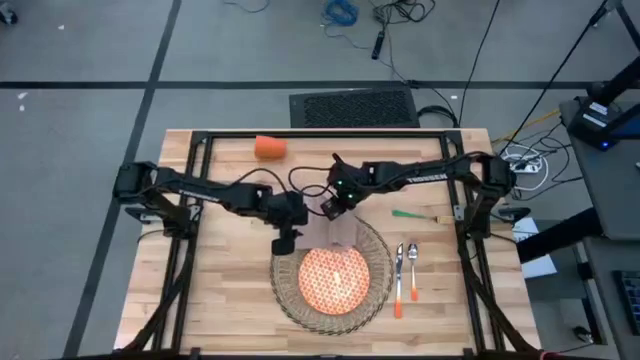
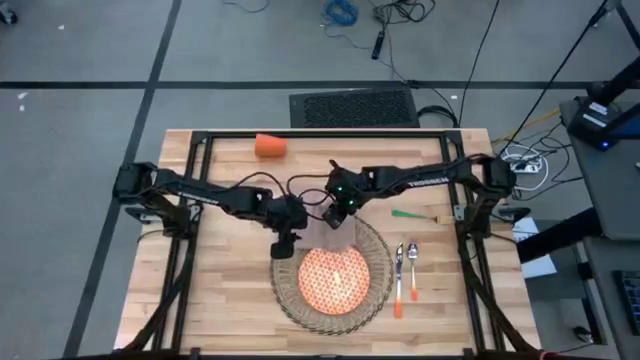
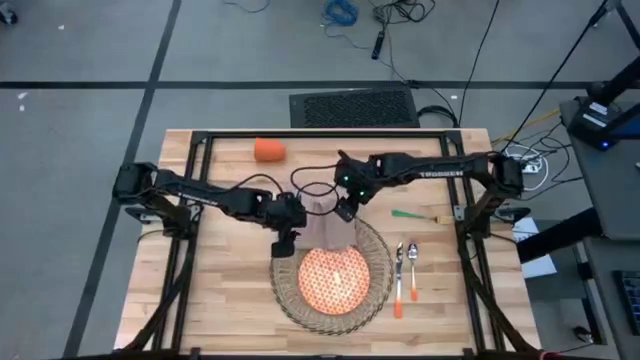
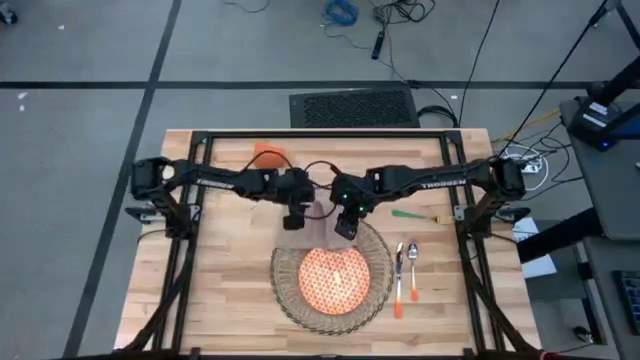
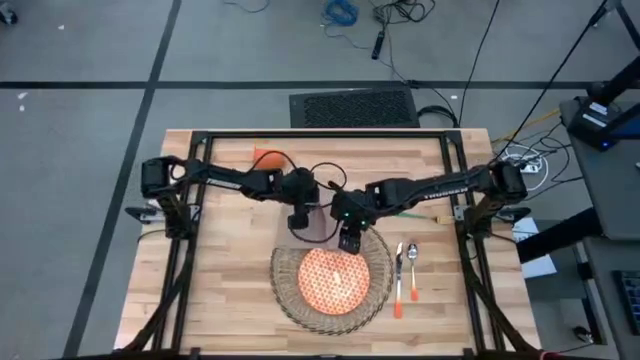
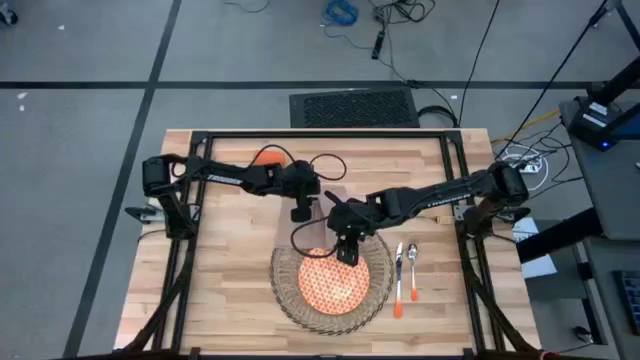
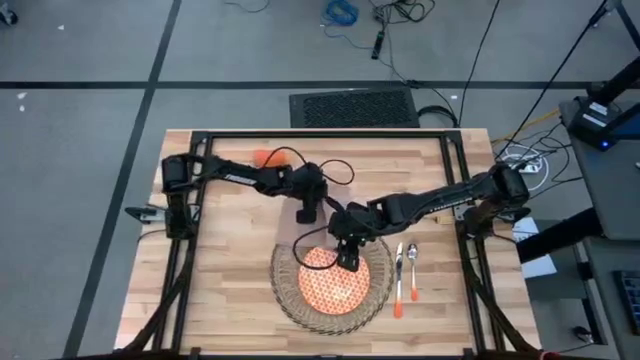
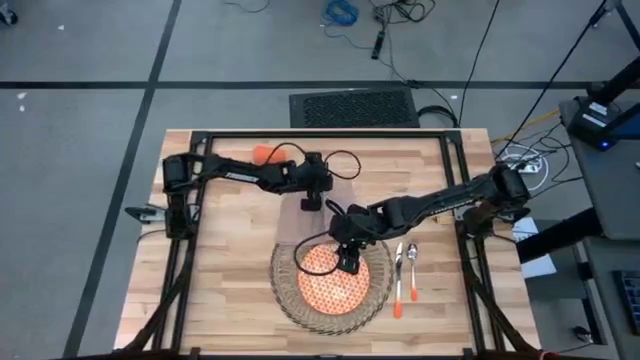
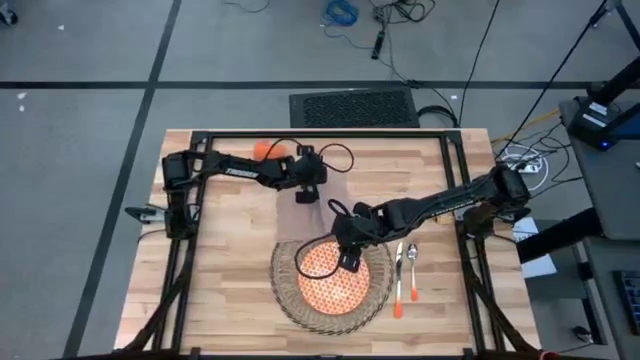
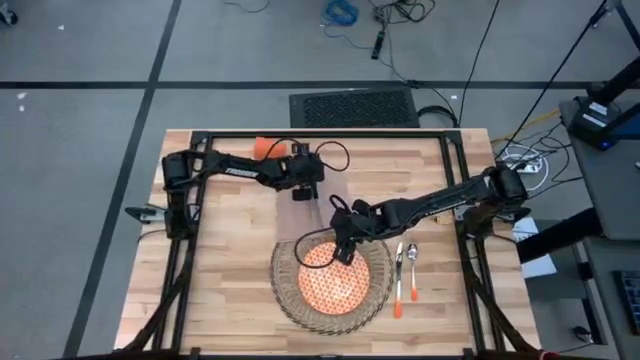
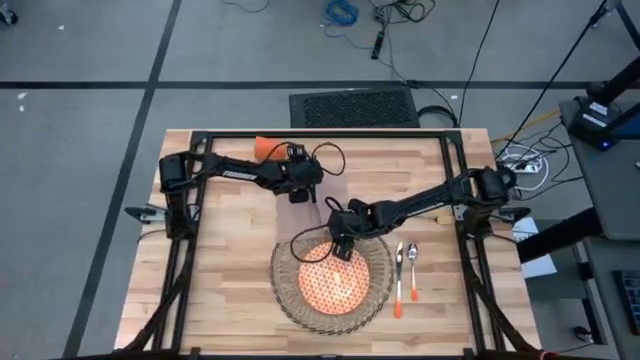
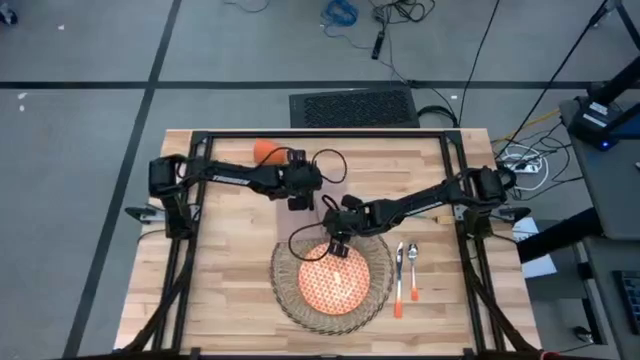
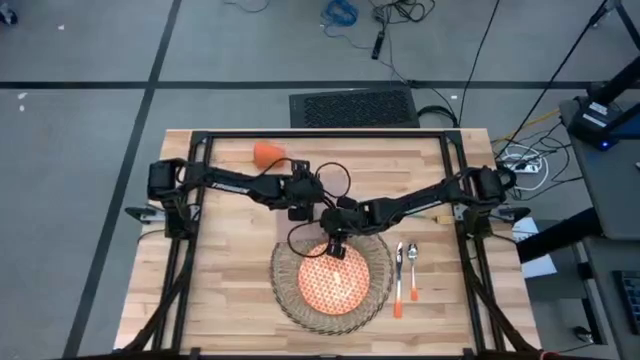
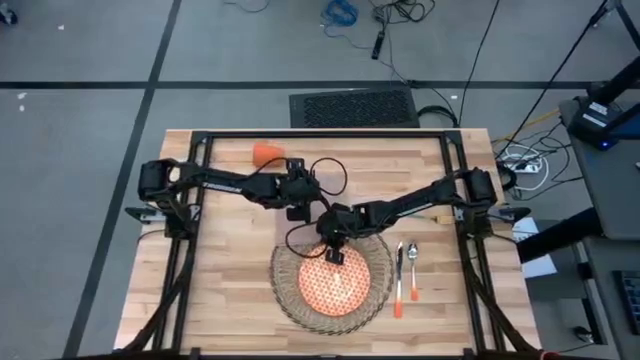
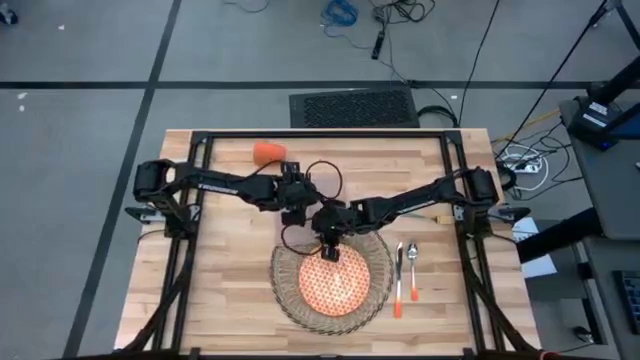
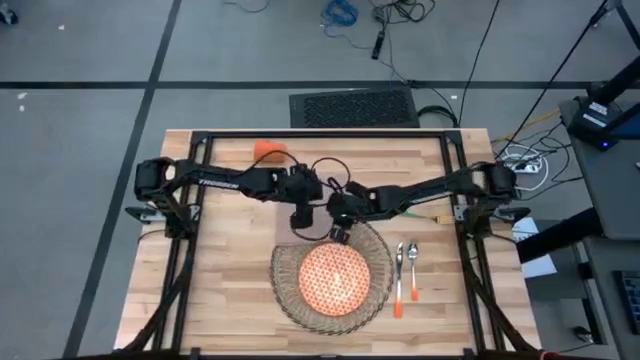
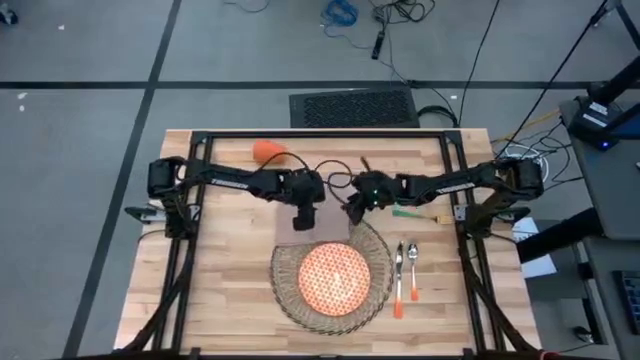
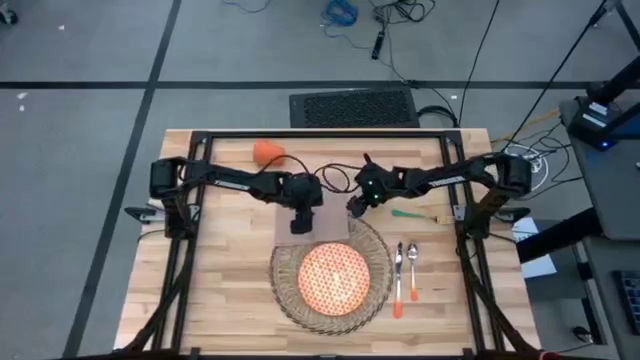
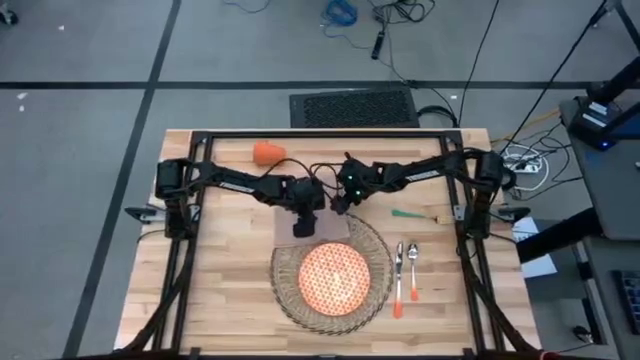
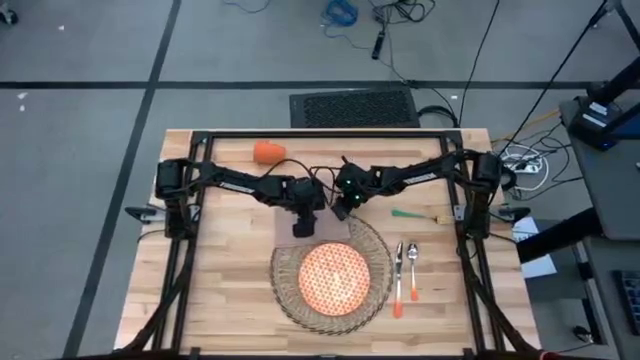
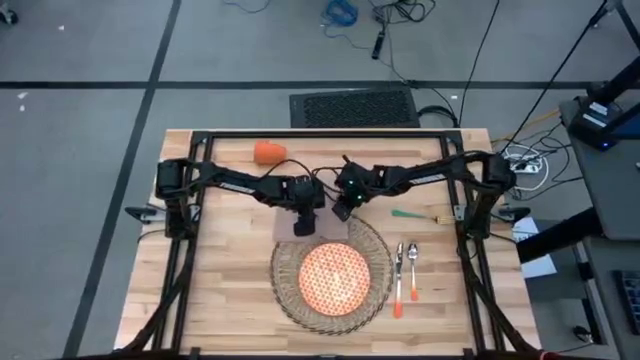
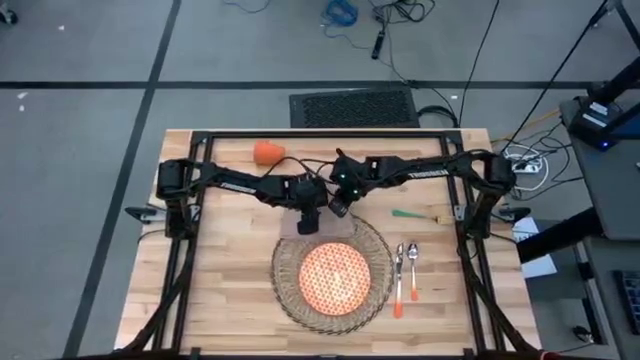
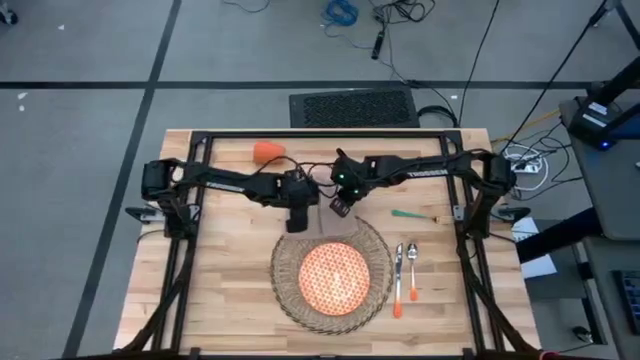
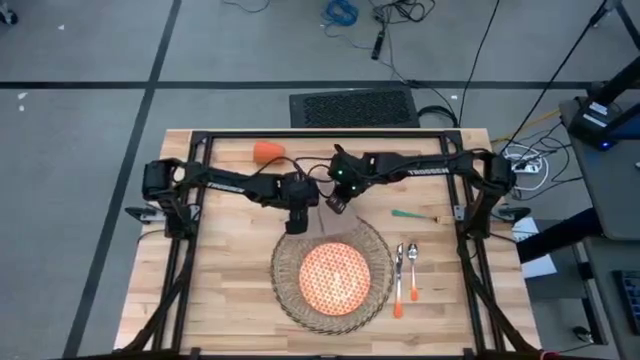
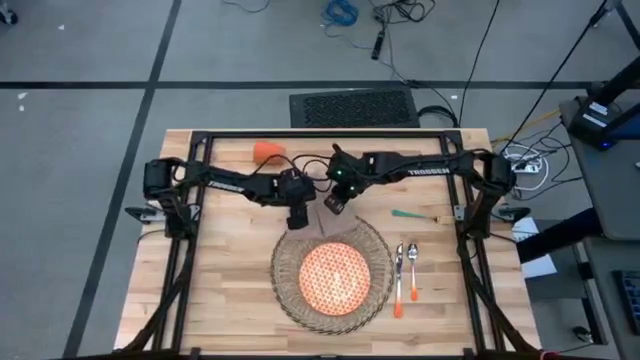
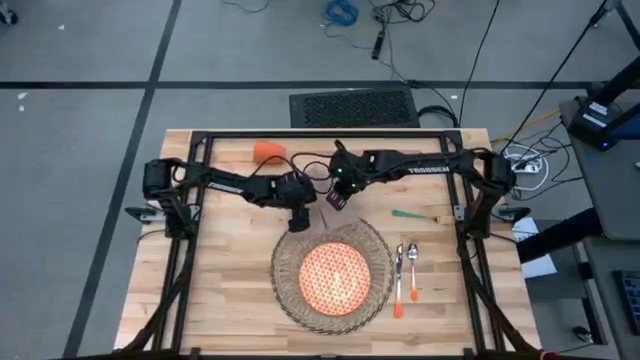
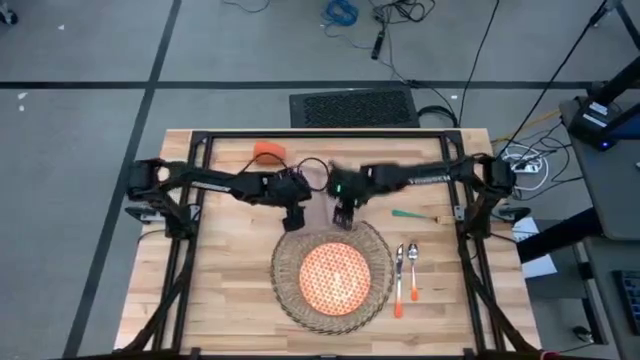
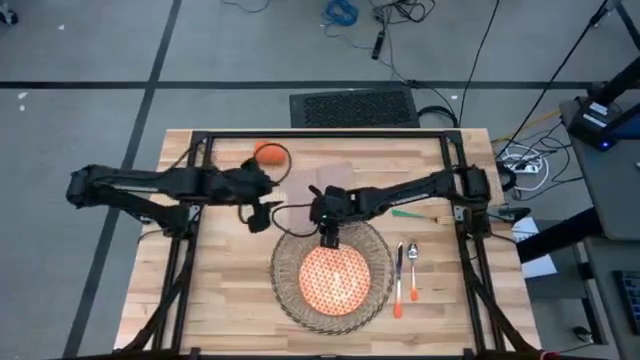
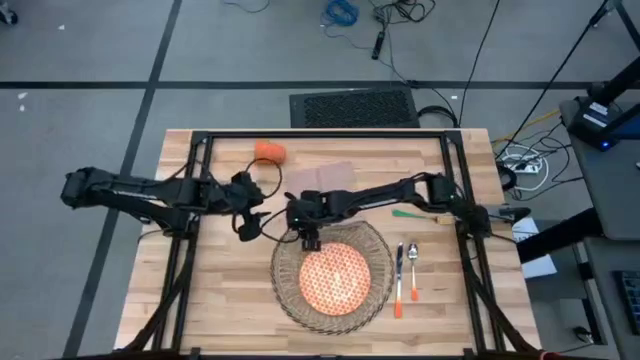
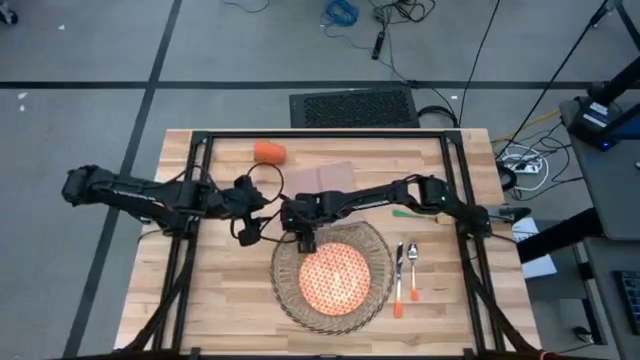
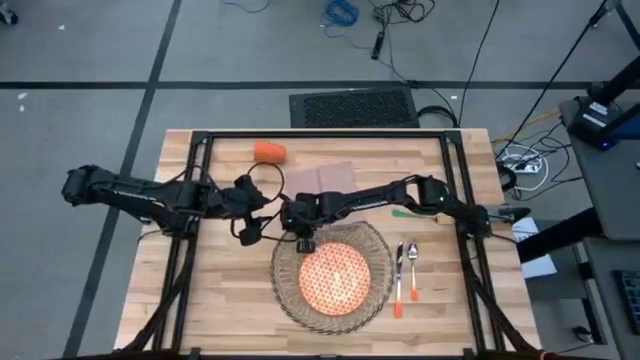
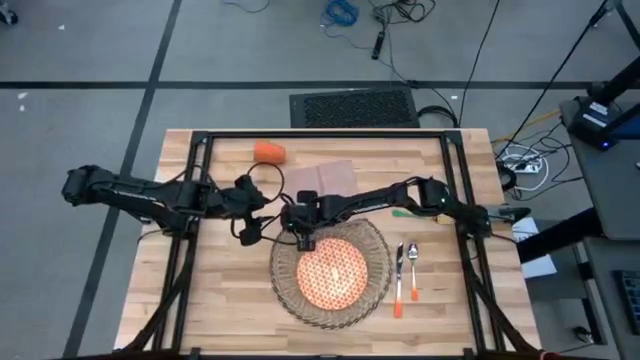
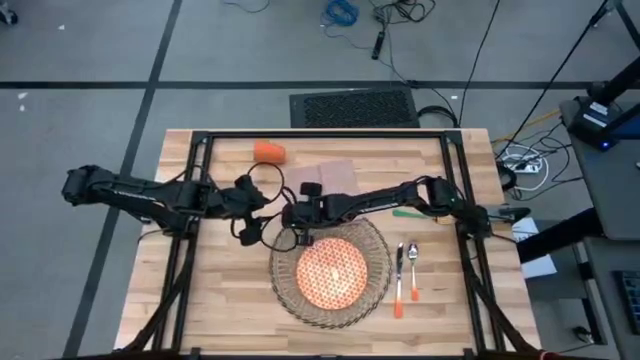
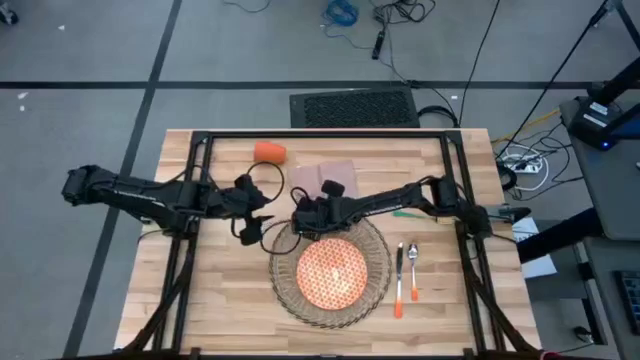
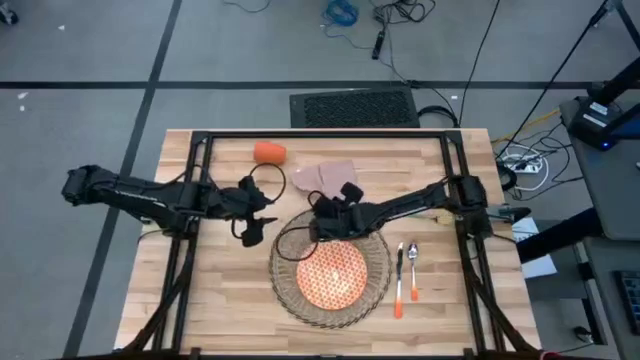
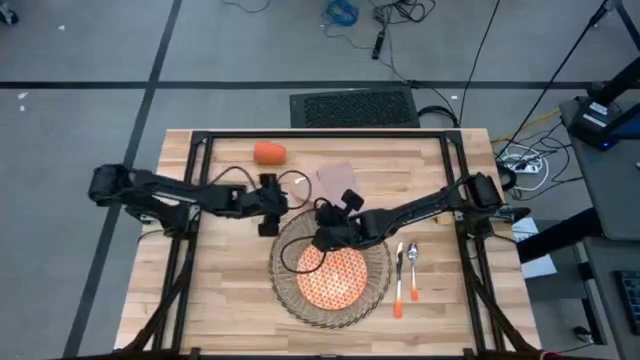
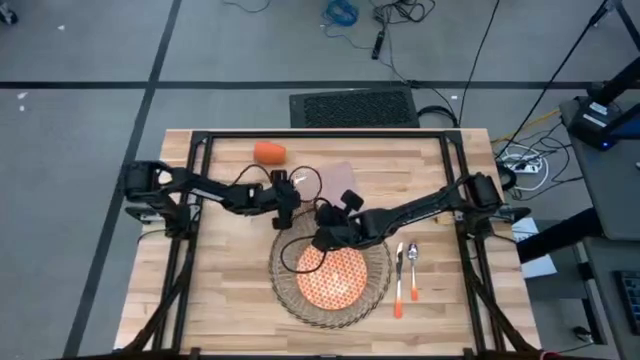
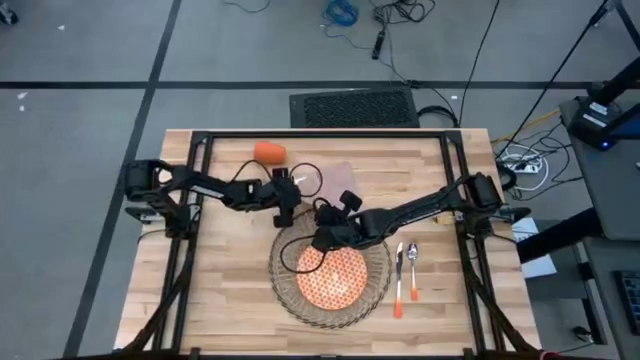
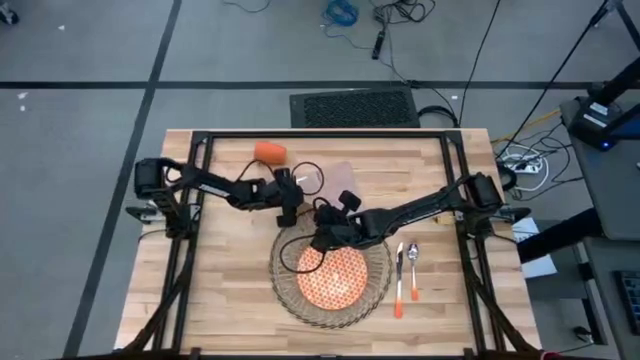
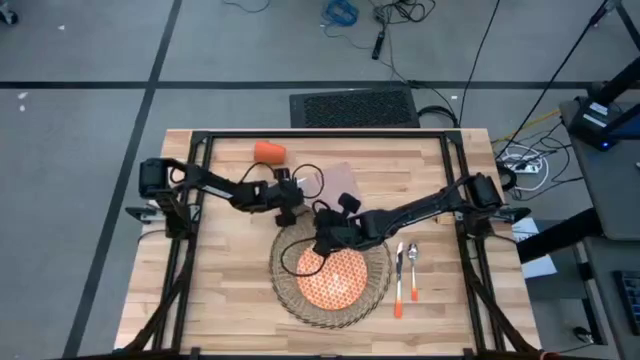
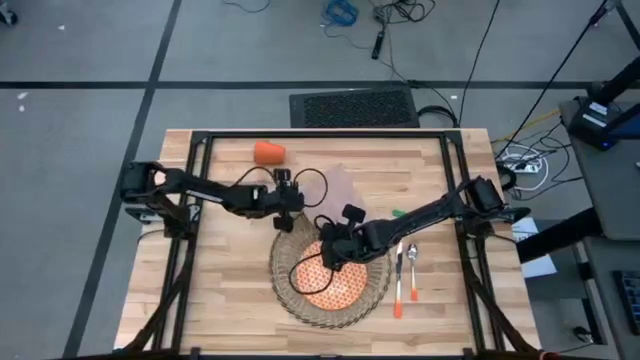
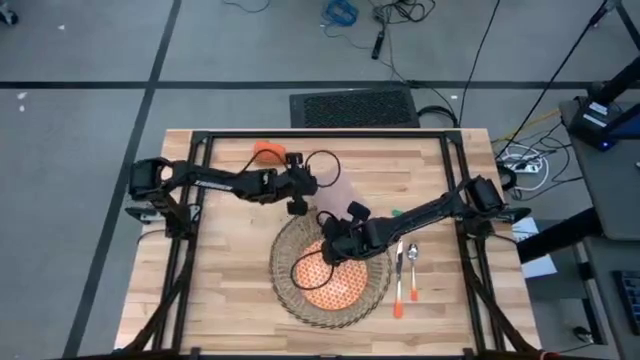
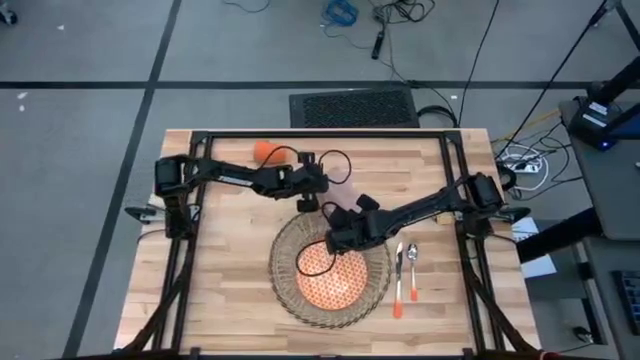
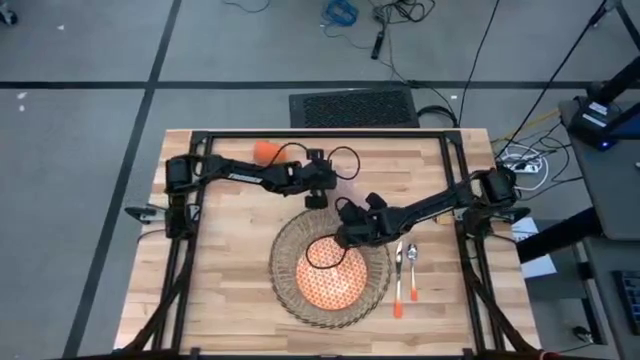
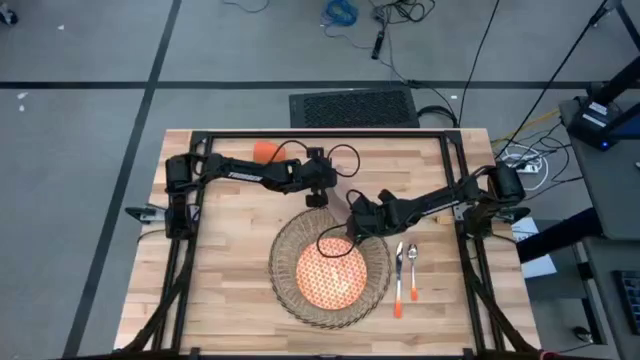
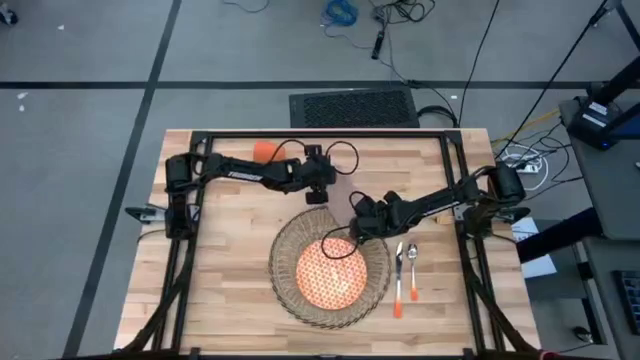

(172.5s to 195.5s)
Task: Set table place
Fold the white napkin
